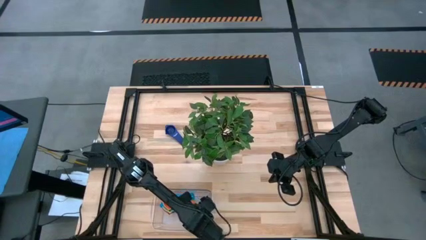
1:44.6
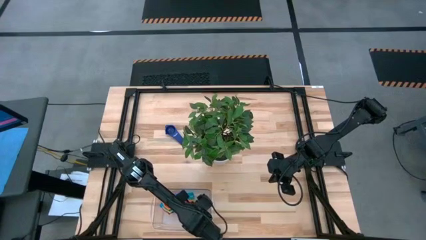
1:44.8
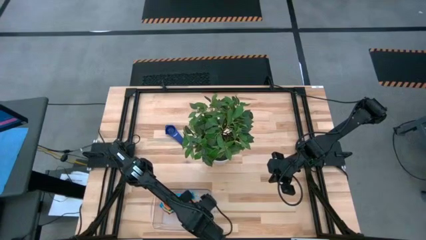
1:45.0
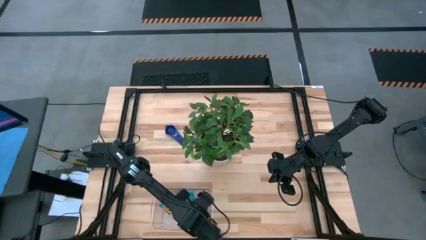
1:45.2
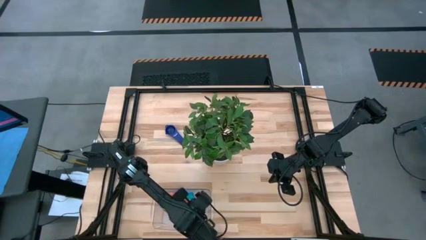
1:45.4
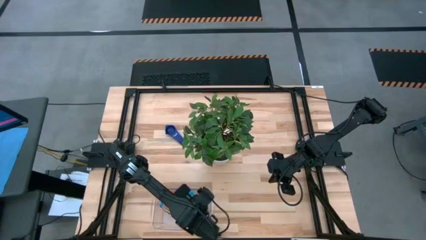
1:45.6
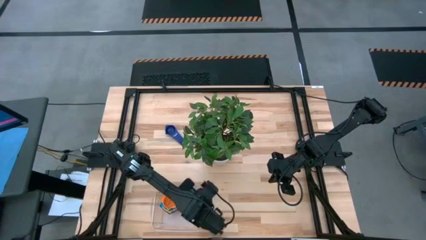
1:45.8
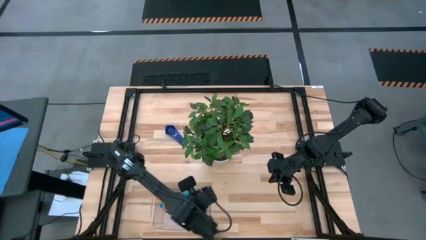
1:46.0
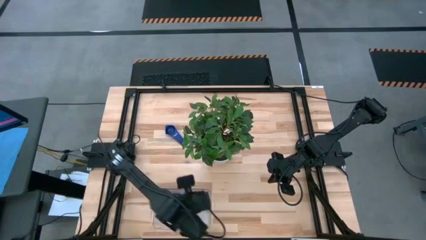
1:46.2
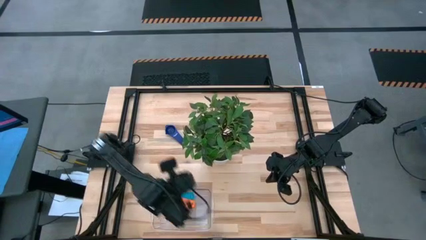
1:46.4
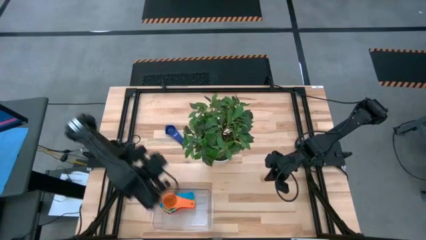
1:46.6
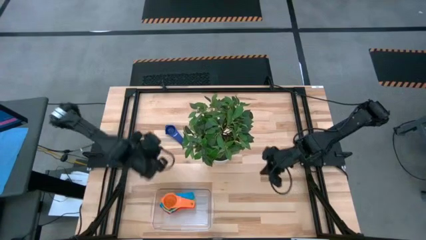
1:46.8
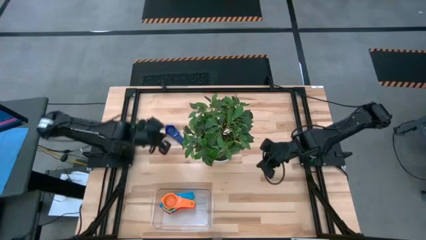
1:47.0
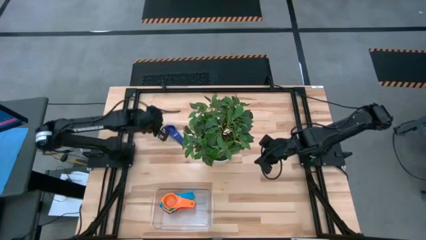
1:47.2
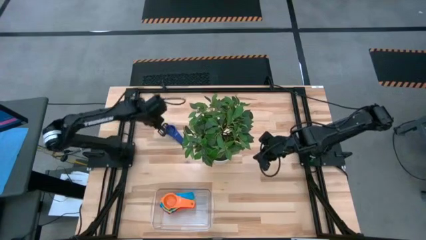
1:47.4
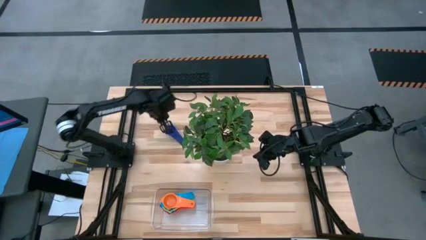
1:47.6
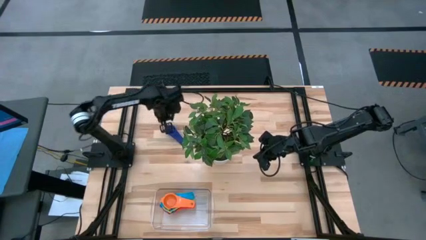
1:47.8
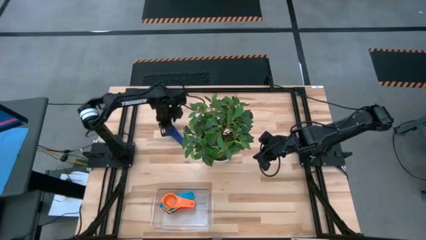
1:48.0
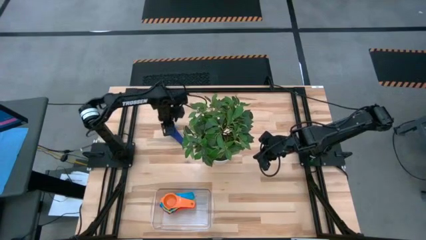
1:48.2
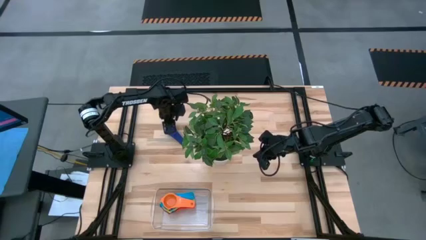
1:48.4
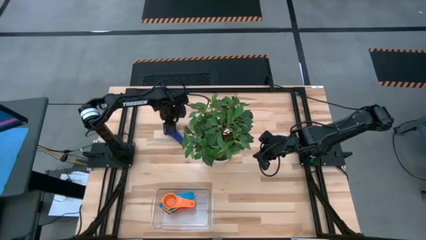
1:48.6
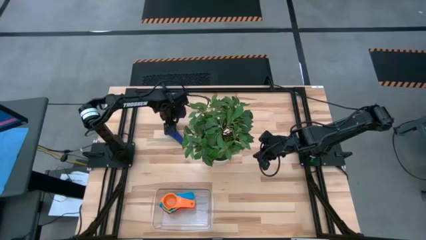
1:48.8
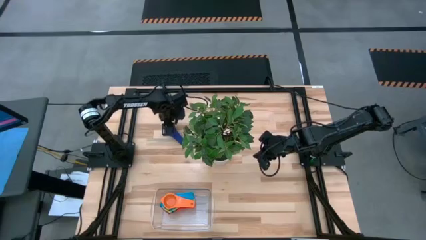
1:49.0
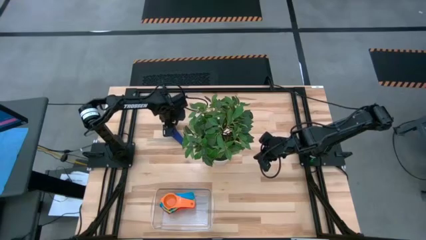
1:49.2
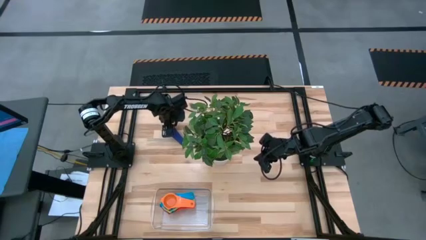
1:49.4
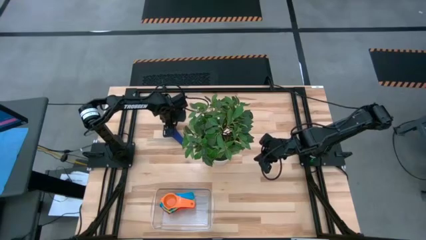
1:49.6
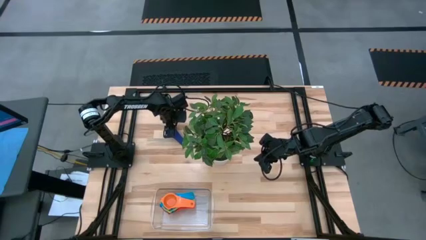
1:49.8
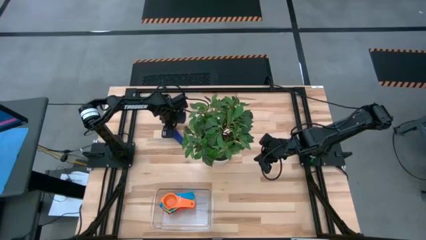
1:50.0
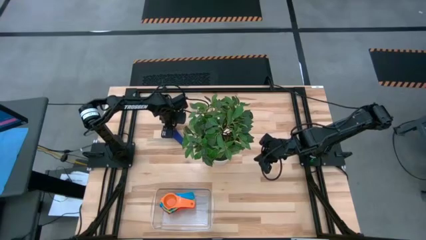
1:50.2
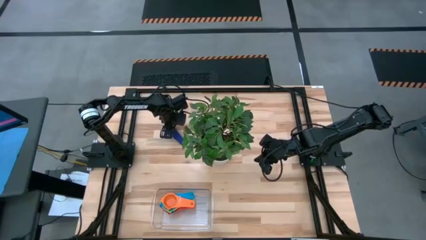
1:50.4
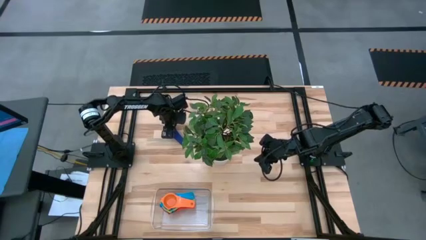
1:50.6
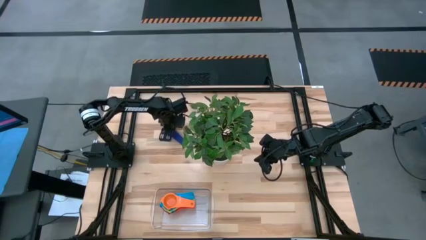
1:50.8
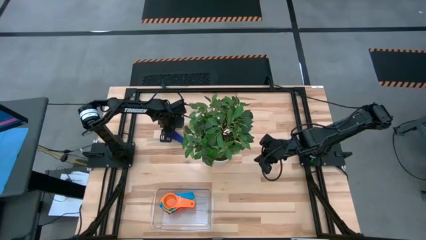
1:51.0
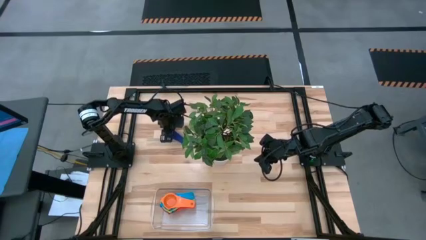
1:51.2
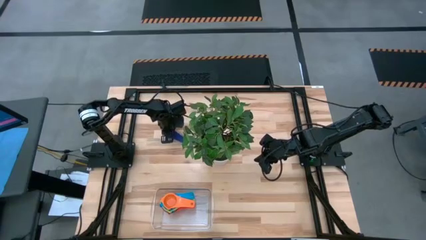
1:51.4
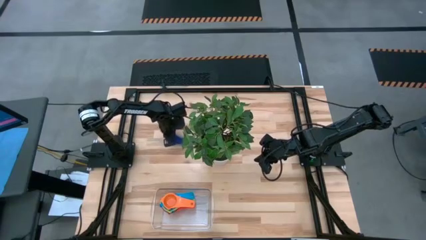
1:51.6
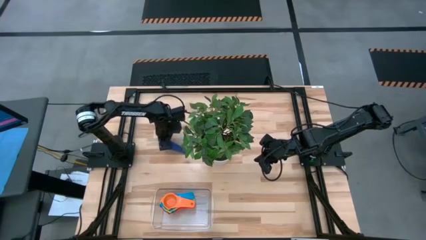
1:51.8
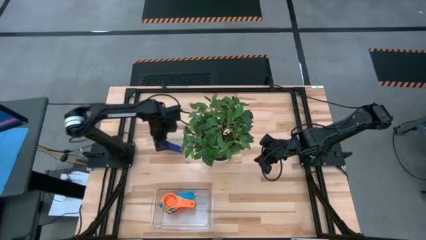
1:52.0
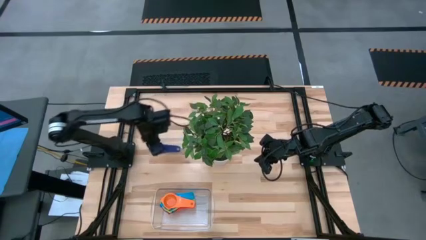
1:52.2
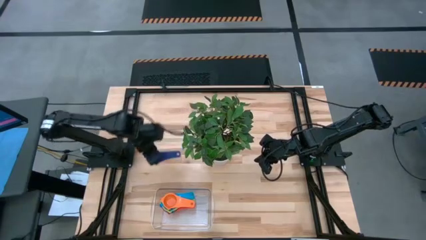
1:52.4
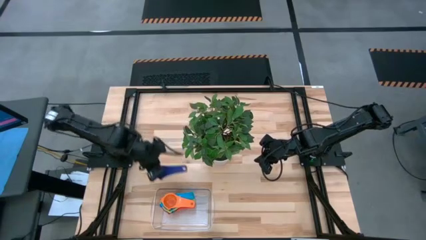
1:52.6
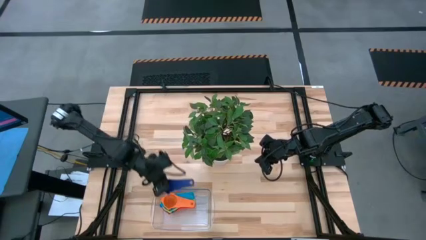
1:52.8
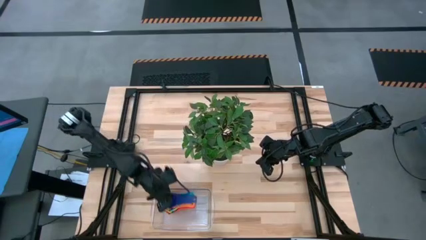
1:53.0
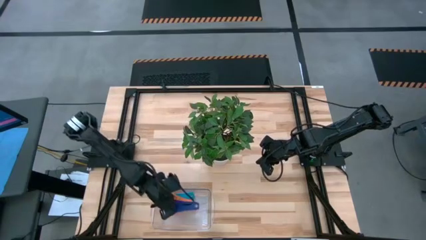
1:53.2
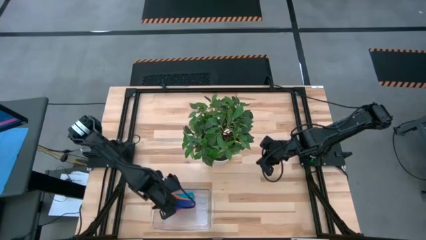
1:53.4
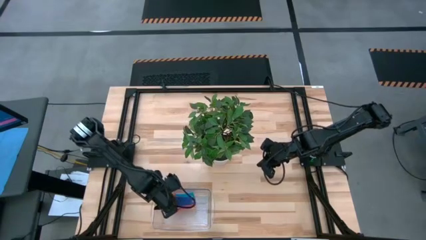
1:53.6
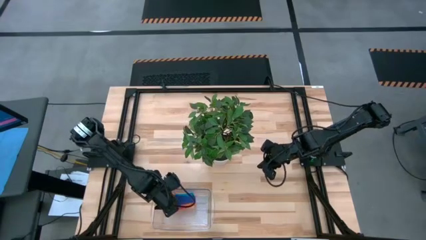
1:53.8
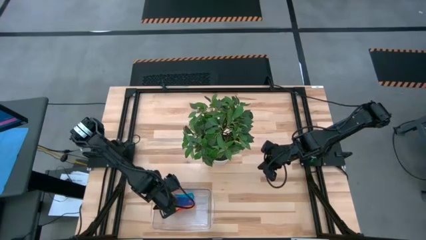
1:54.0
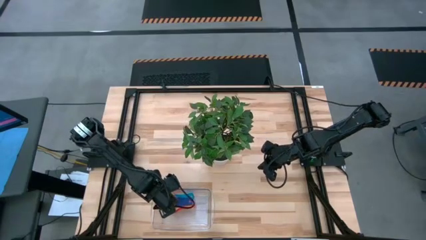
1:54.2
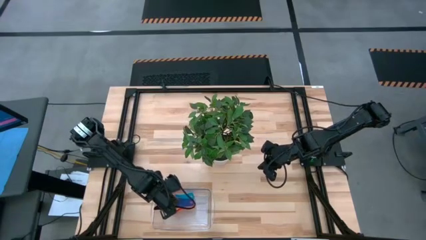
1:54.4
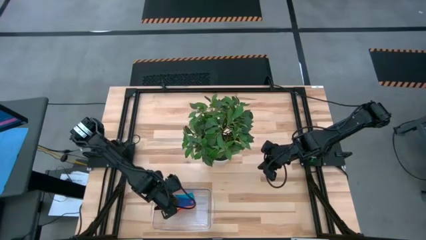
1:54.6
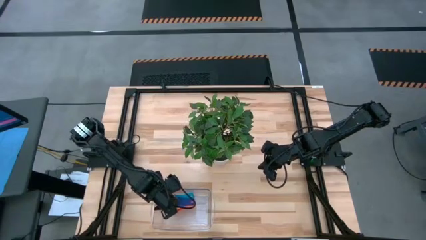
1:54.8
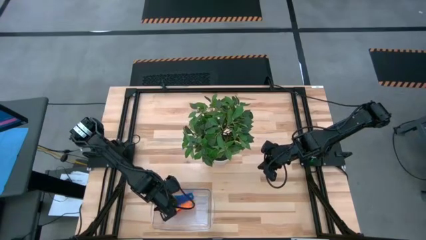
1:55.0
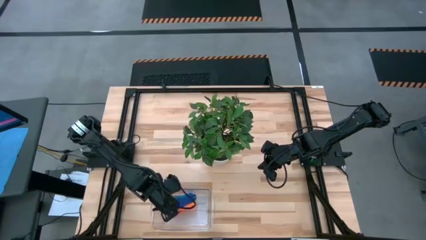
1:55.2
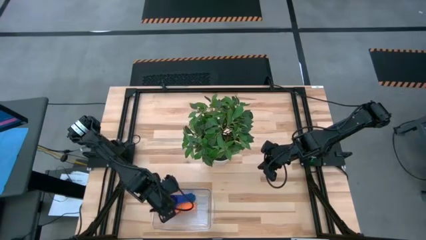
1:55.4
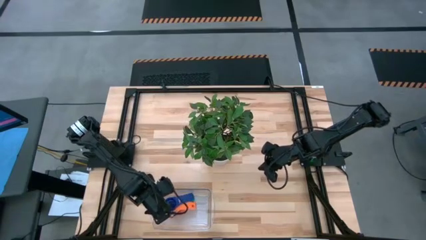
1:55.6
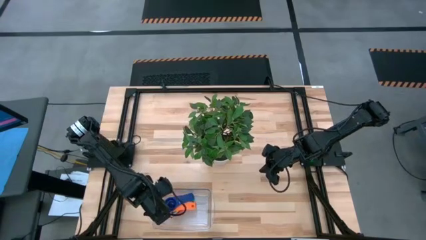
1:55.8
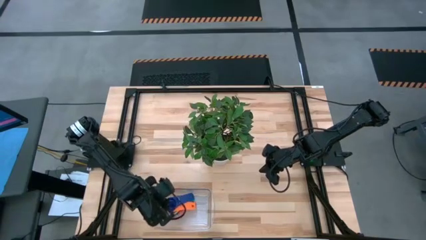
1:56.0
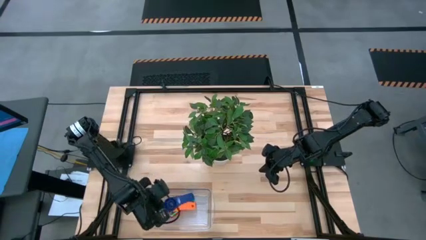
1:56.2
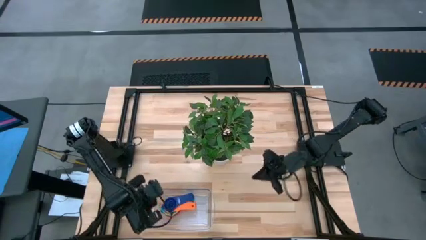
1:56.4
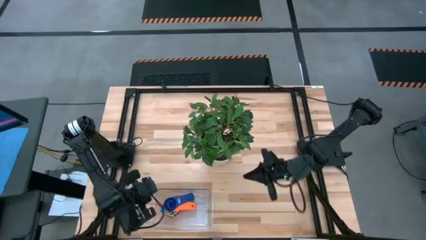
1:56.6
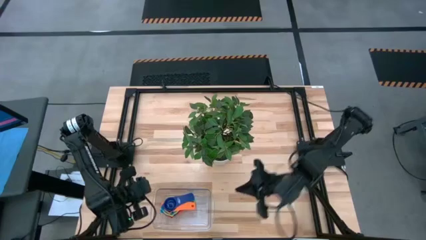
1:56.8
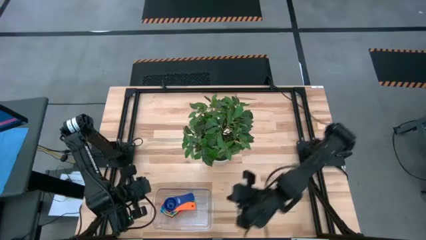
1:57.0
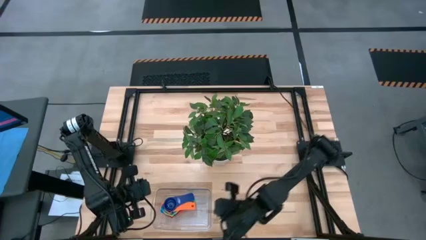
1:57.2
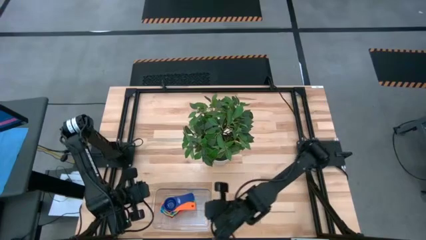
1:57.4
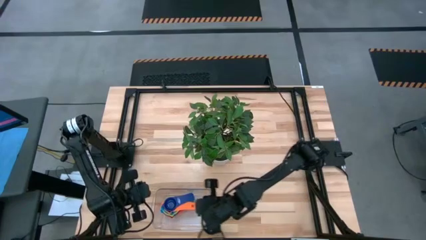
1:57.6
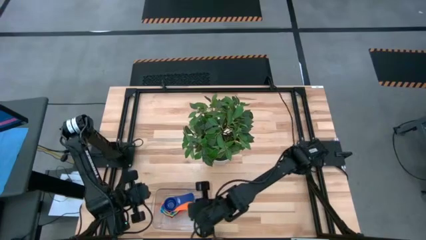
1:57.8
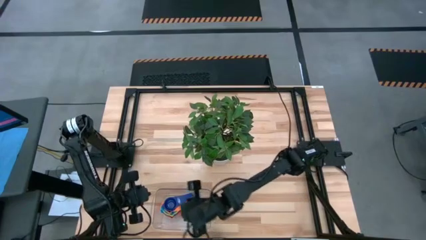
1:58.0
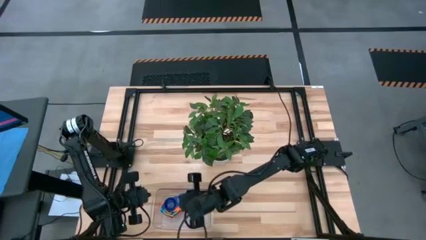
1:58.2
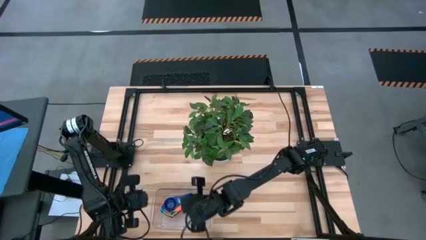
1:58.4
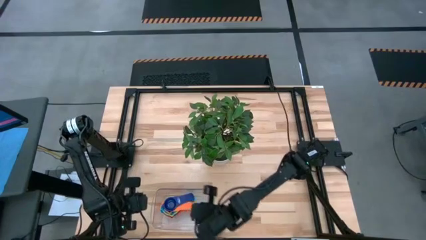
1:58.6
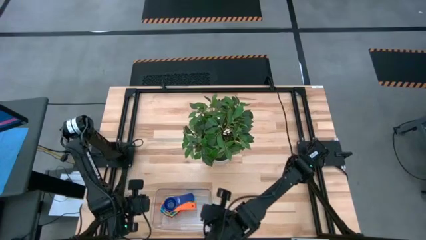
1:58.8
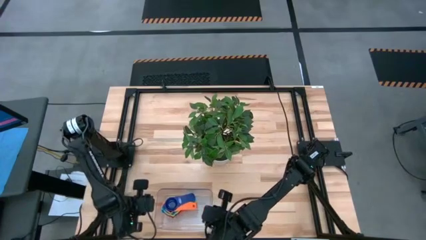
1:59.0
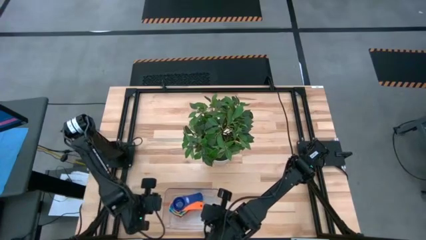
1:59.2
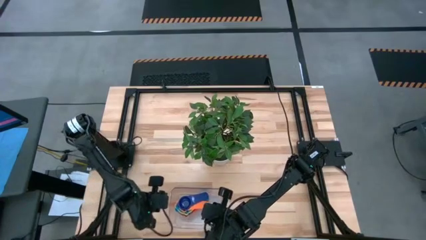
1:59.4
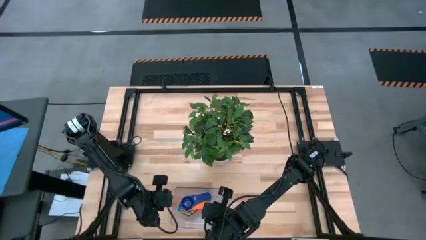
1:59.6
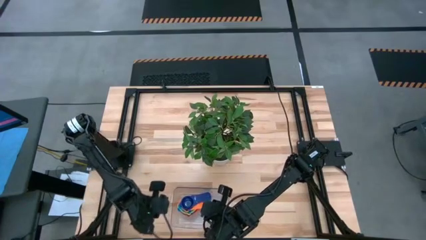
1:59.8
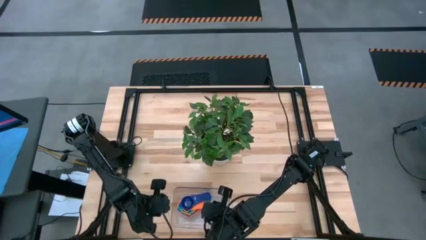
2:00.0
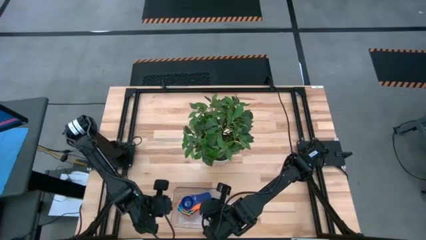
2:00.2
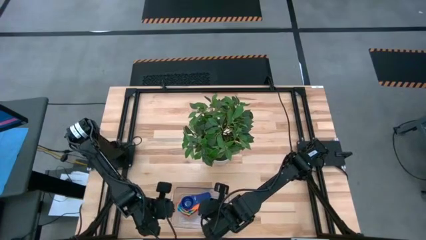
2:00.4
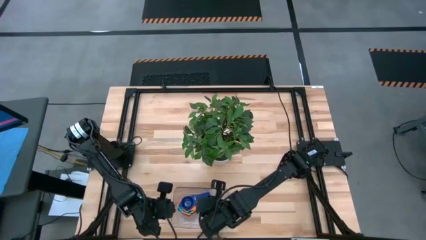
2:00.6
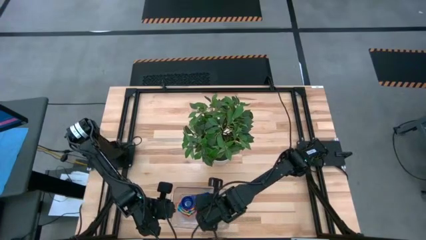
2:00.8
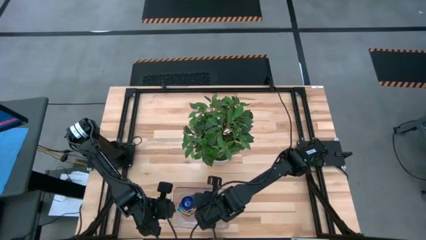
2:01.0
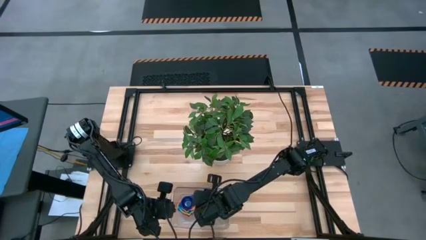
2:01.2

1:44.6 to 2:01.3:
Task: Nest measuring cups in basket
Stack the dark blue measuring cup on the orange measuring cup
